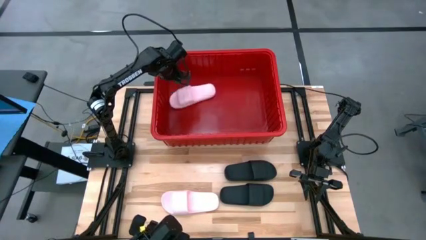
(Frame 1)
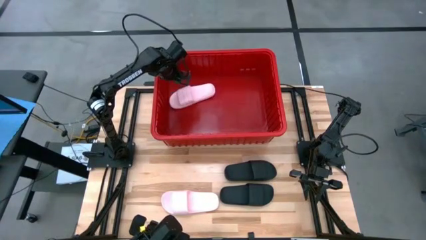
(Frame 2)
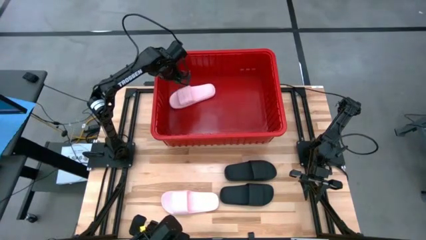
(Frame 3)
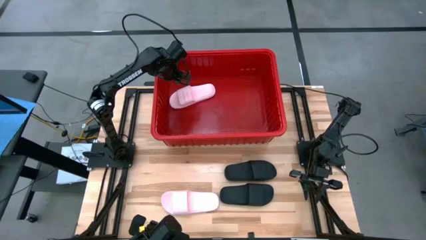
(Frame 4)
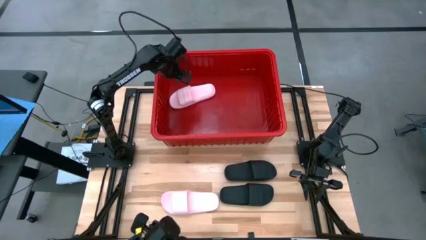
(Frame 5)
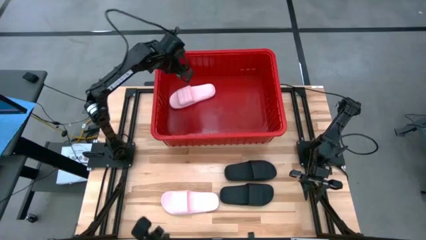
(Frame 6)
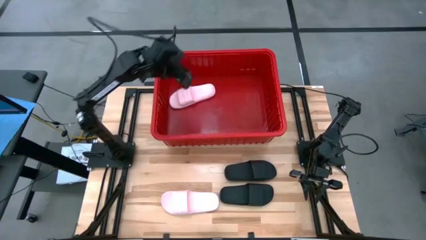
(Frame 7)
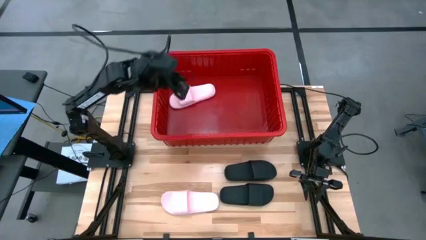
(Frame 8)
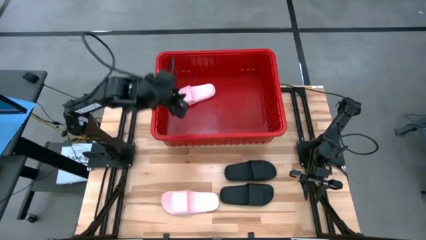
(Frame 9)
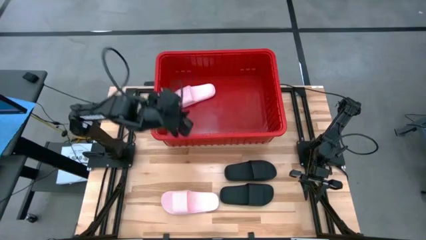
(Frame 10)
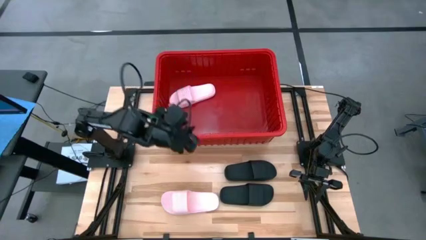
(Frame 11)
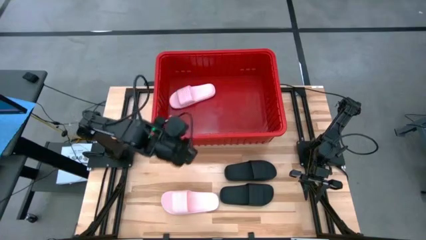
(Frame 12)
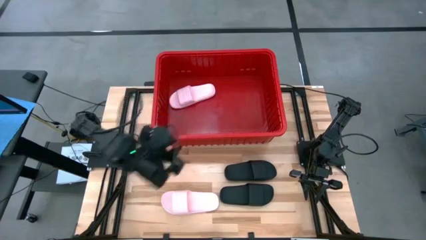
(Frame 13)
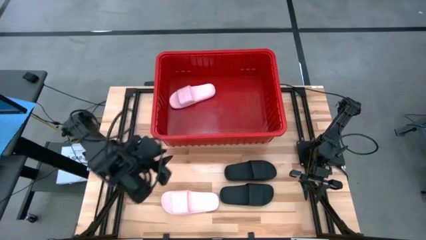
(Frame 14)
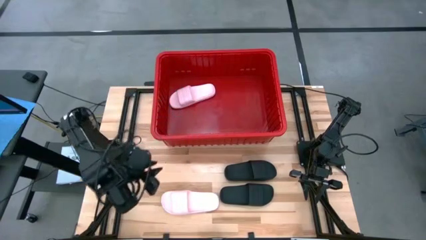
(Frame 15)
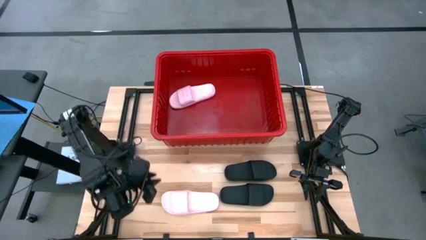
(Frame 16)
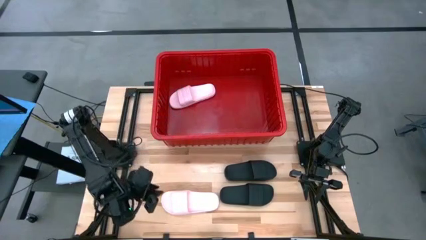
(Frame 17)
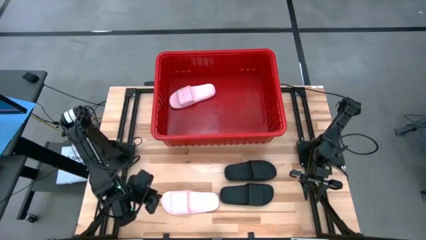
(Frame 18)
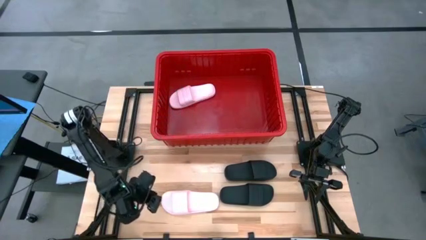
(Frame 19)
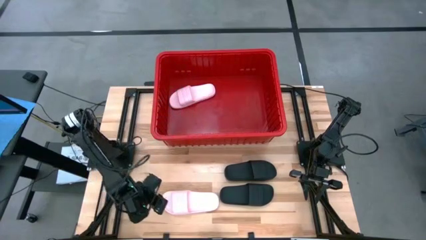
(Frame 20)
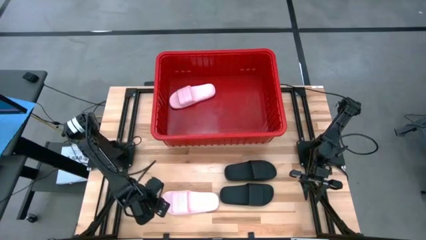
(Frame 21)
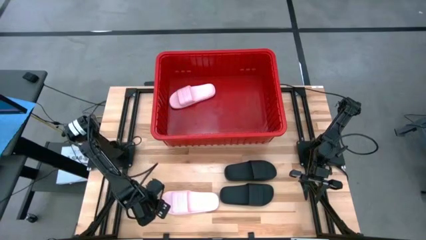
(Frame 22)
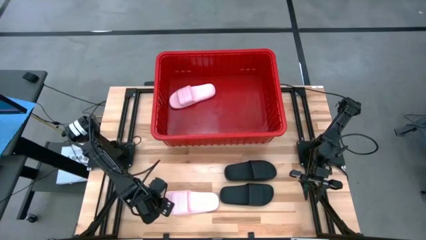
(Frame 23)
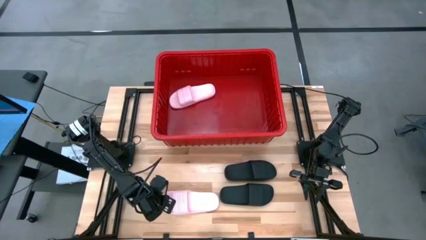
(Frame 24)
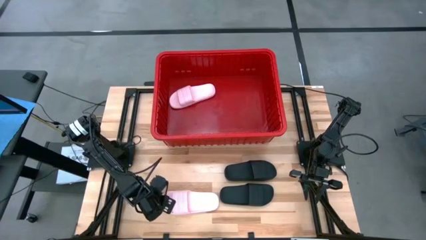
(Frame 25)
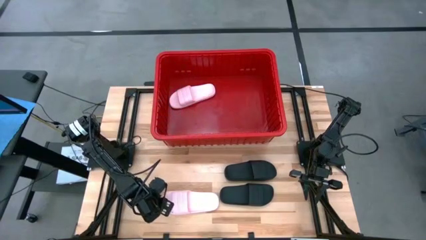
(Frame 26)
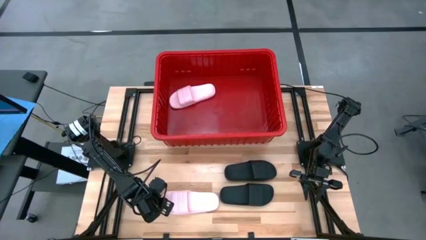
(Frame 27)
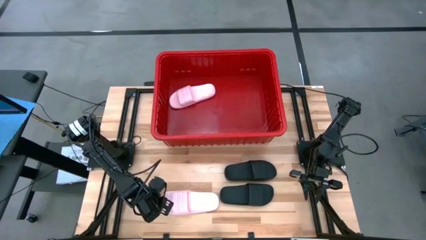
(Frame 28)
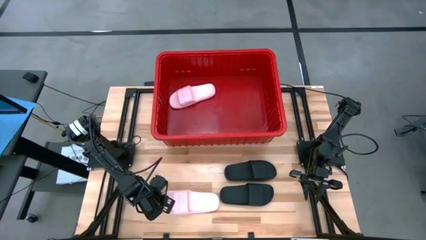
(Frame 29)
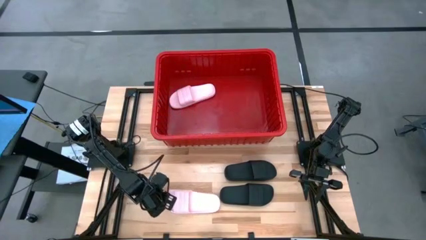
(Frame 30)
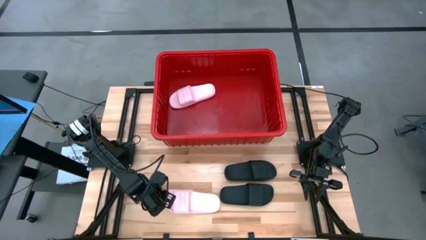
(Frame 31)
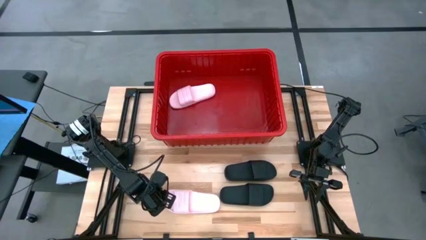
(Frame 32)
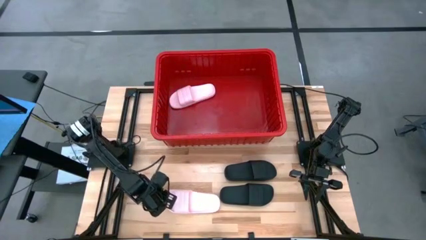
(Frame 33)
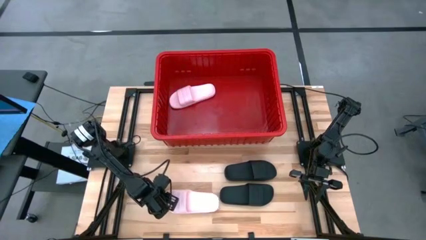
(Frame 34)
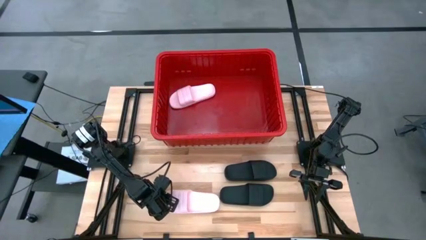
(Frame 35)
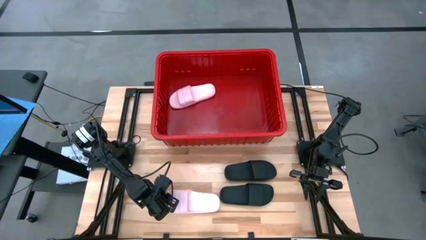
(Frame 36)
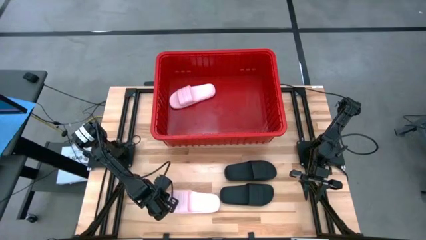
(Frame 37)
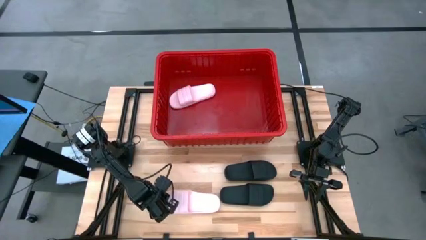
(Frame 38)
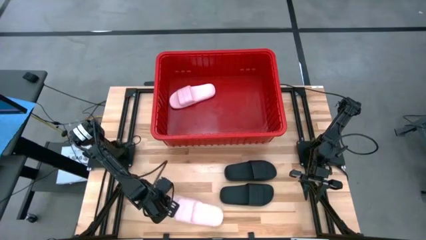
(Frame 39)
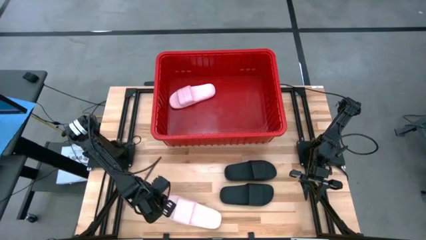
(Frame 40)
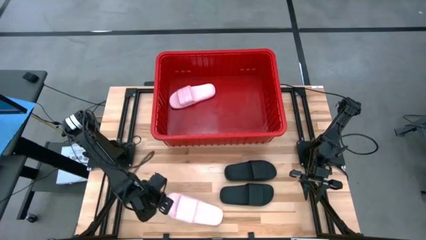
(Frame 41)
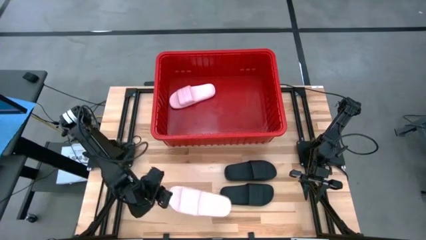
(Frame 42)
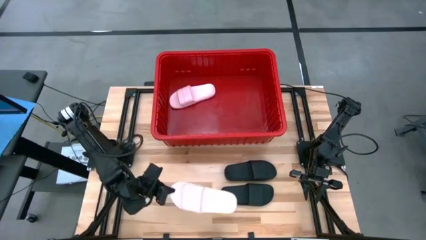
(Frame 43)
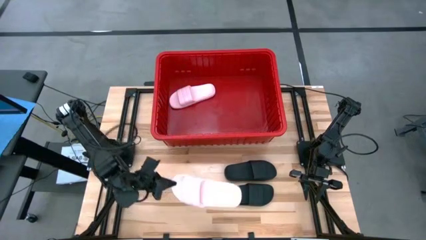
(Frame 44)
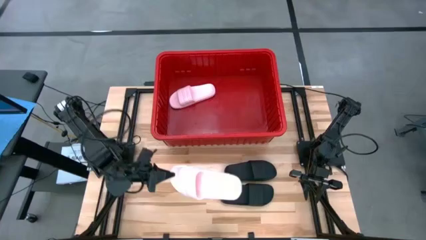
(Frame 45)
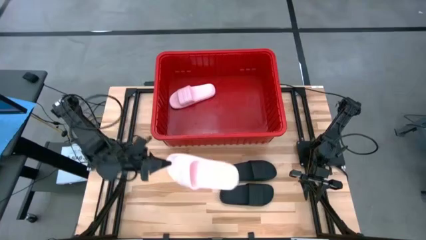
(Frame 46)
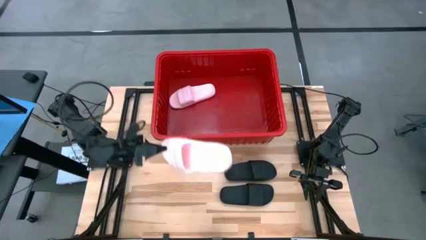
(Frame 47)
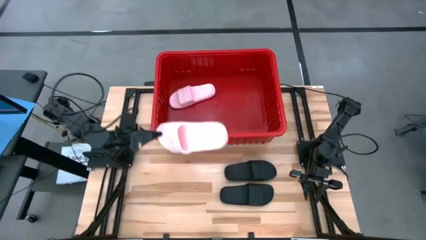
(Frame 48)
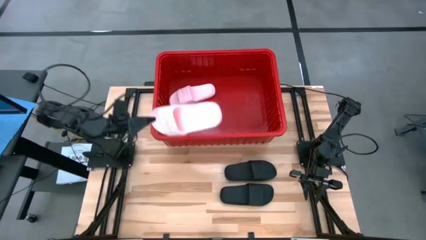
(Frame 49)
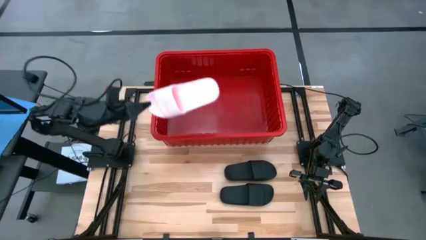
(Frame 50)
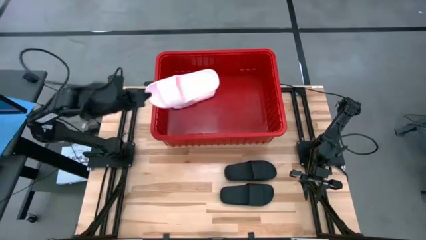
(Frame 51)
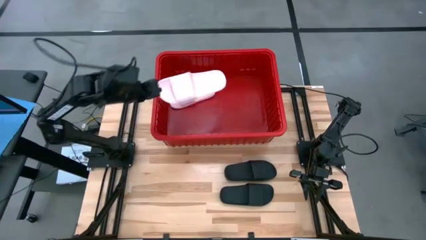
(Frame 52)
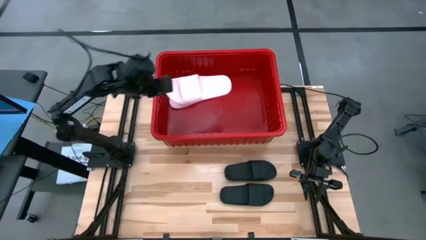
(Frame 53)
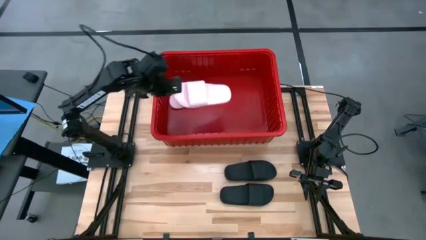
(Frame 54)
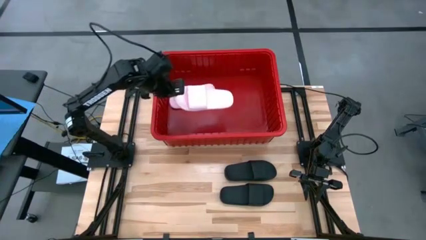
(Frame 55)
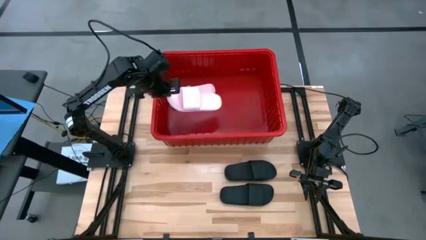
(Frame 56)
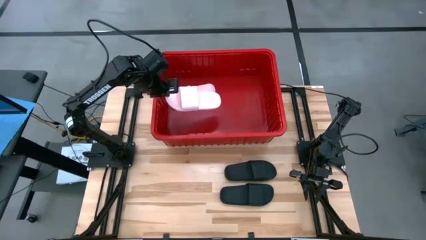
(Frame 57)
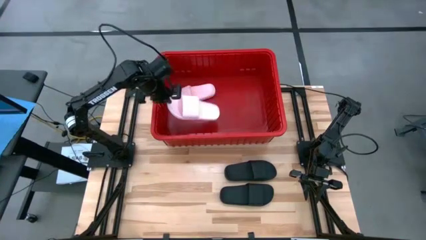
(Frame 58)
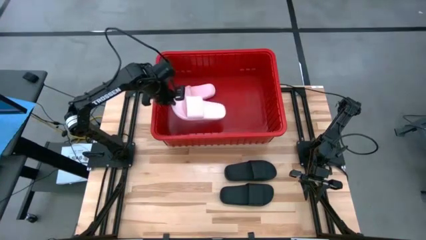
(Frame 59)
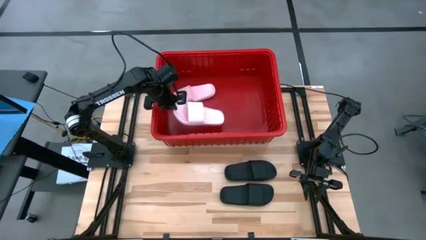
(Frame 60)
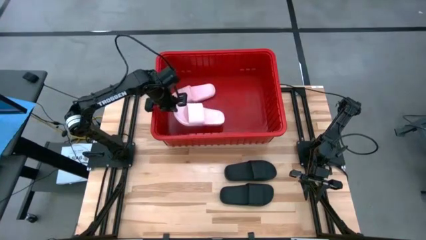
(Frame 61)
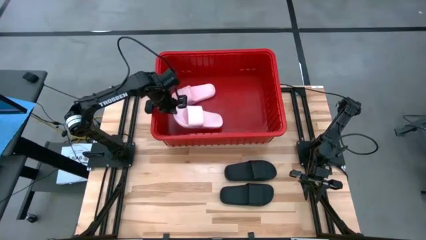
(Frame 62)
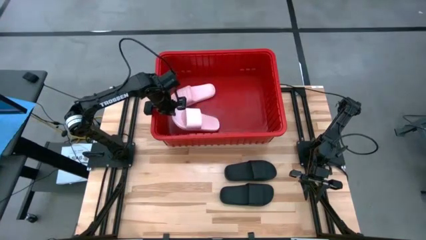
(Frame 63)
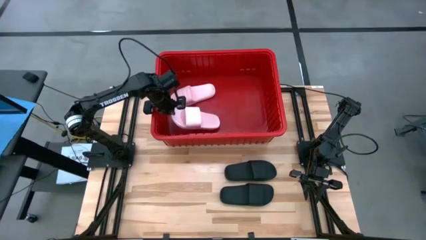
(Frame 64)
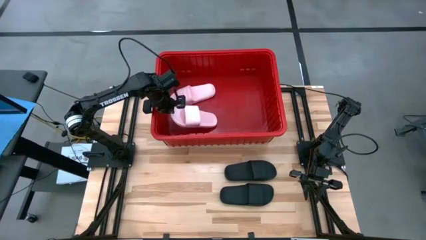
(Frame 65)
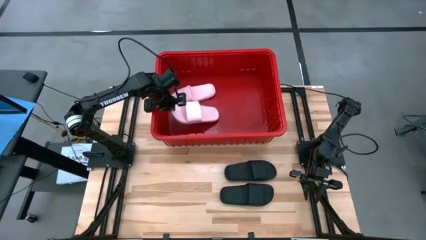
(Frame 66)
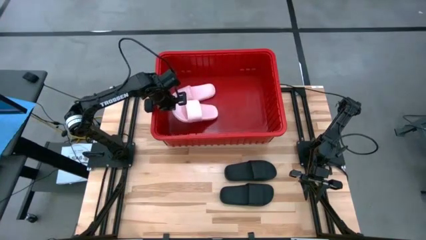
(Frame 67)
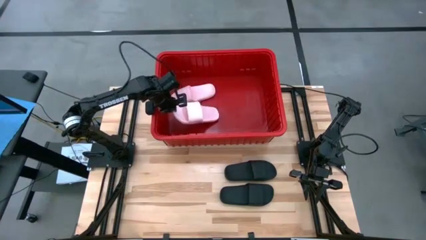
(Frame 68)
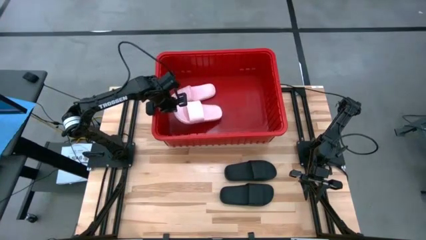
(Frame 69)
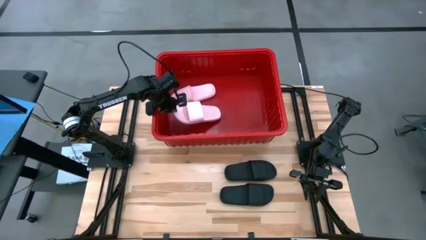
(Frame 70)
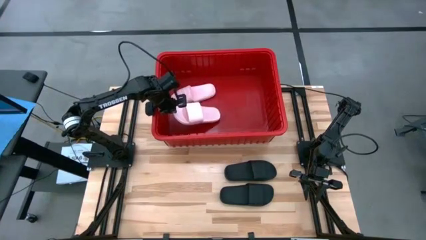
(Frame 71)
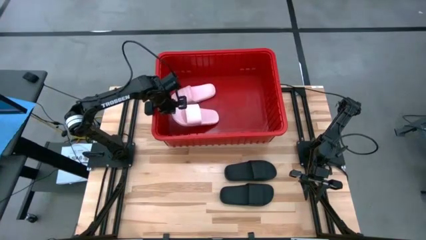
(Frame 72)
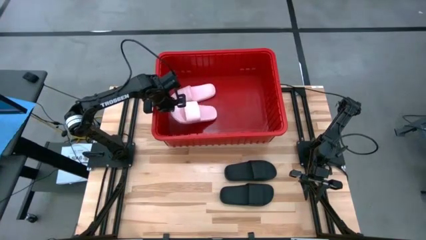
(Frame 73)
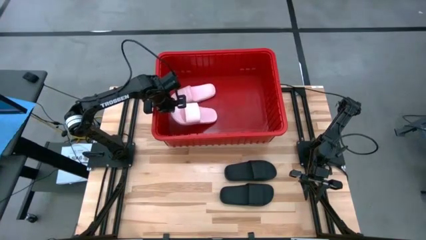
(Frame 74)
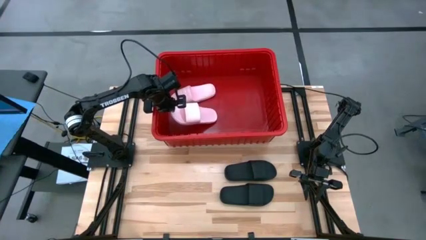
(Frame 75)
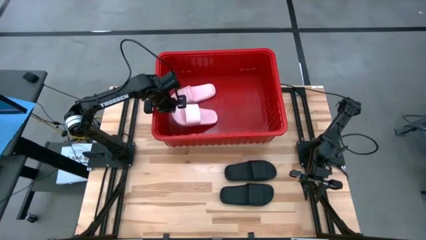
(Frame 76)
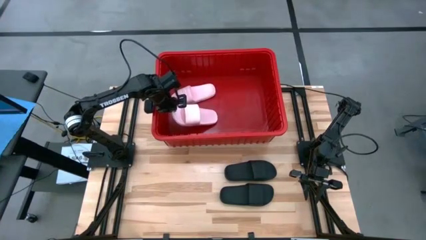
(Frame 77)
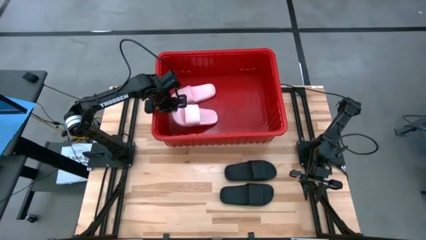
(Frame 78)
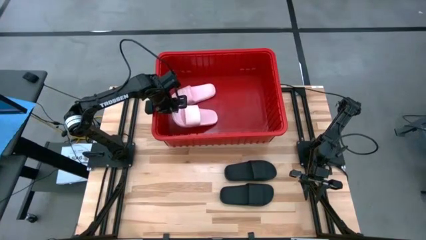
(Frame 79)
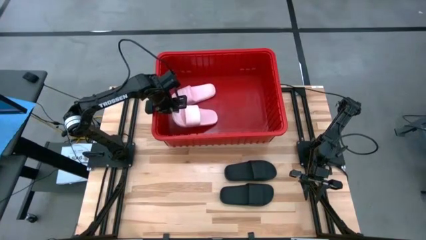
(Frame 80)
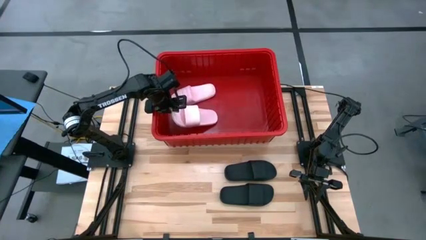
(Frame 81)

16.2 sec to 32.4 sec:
Task: Pick and place slides into bin
Put the pink slide into the red bin
